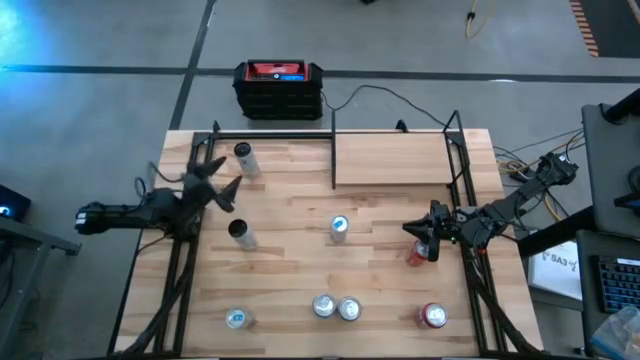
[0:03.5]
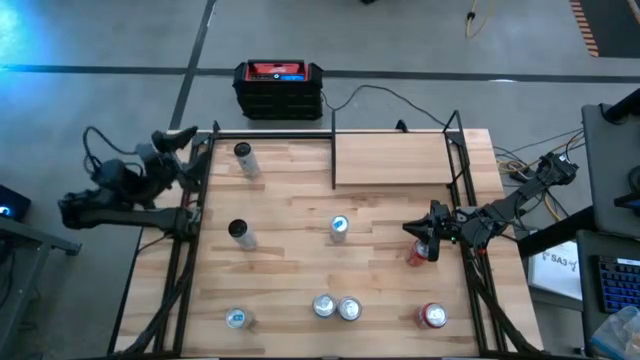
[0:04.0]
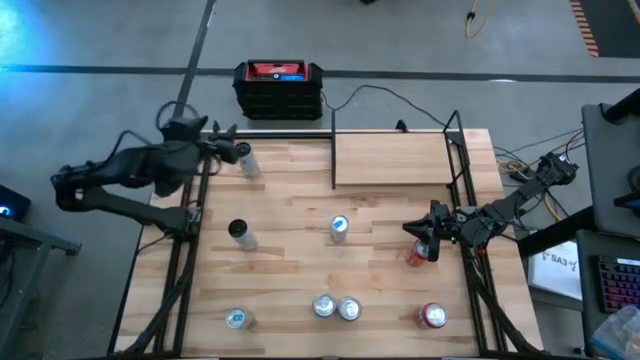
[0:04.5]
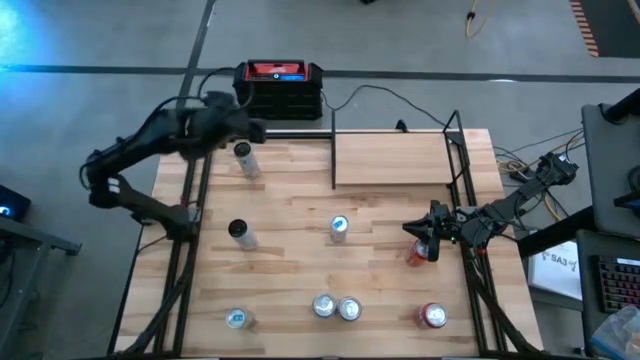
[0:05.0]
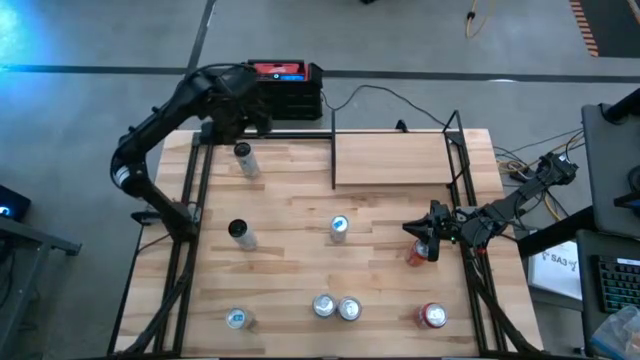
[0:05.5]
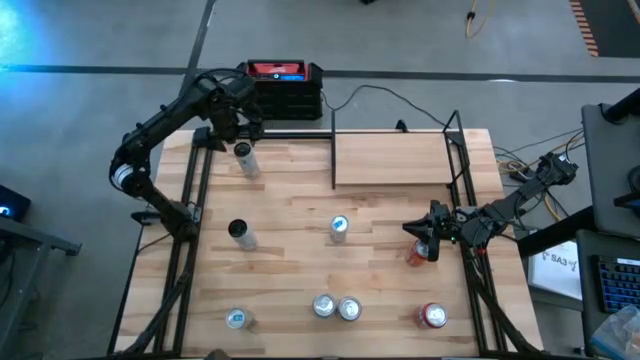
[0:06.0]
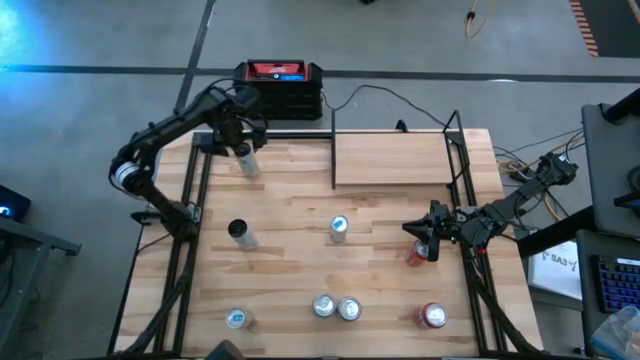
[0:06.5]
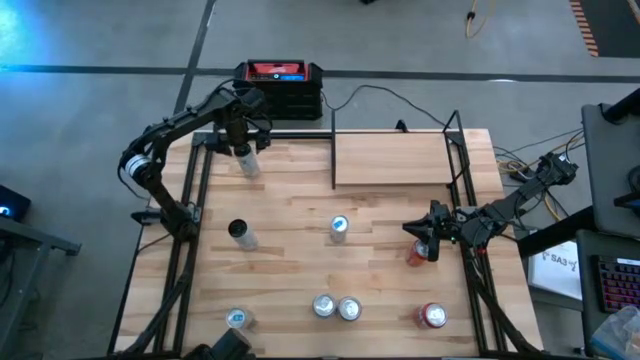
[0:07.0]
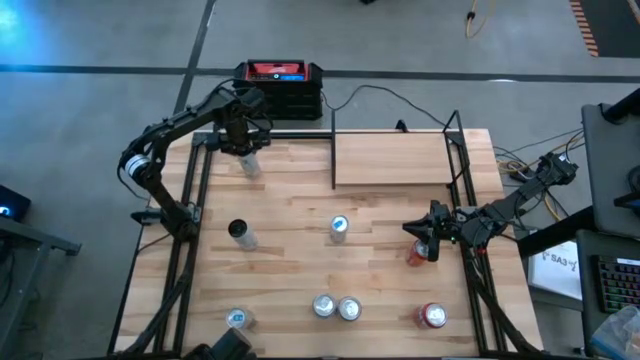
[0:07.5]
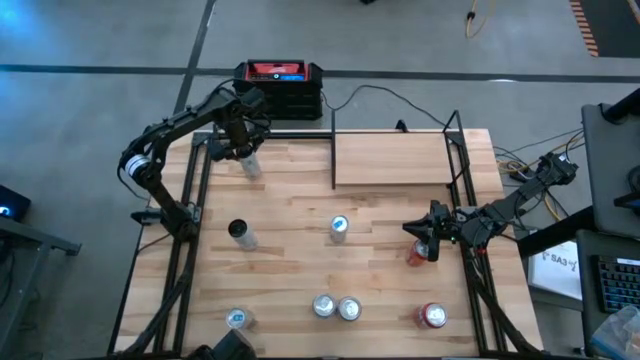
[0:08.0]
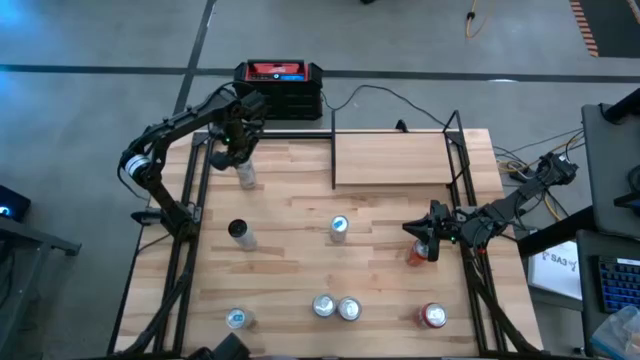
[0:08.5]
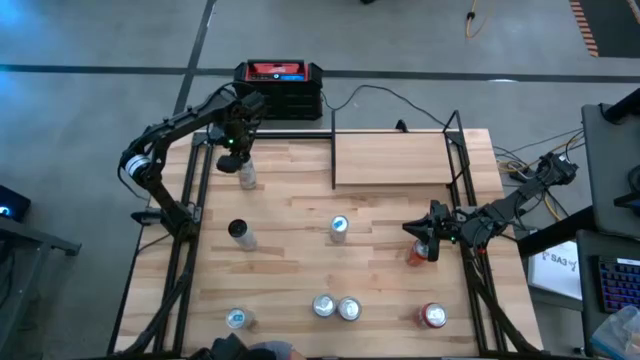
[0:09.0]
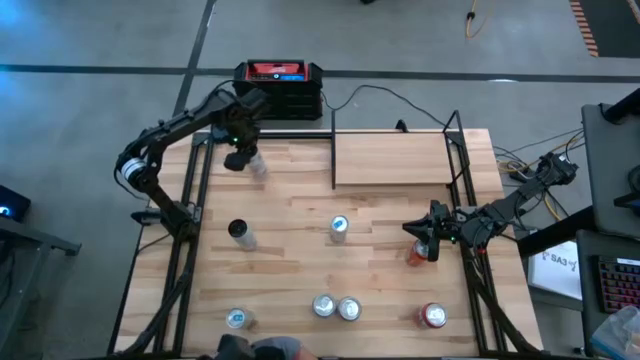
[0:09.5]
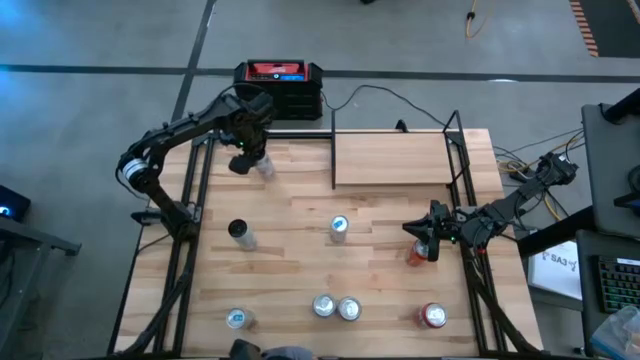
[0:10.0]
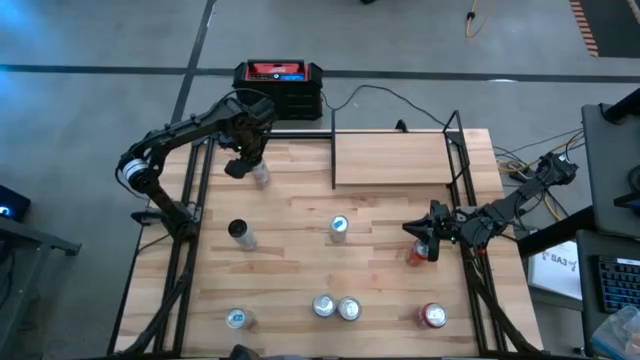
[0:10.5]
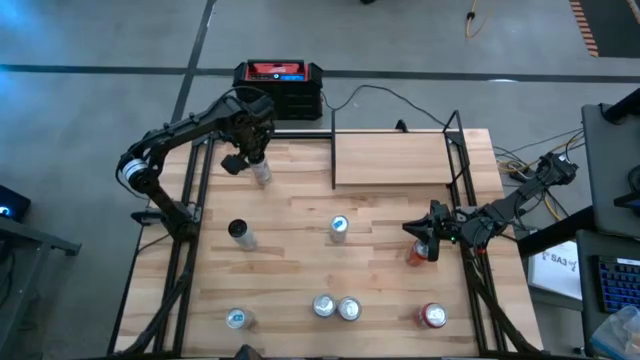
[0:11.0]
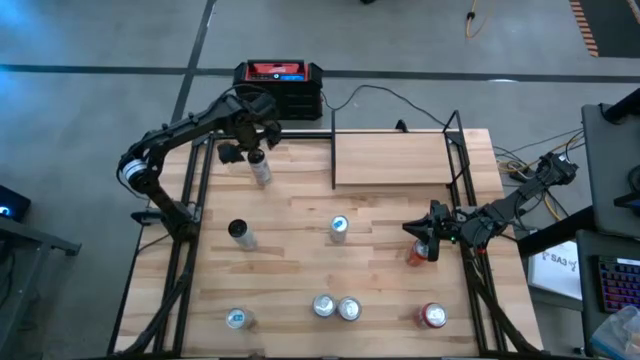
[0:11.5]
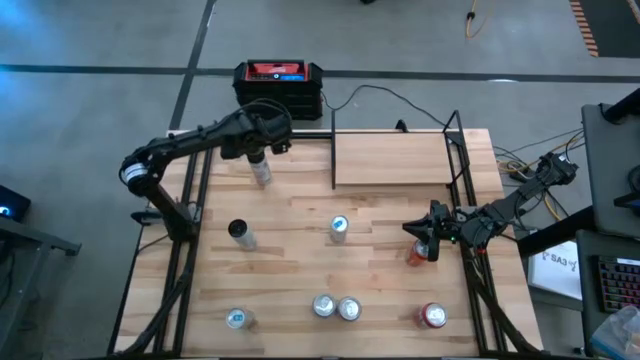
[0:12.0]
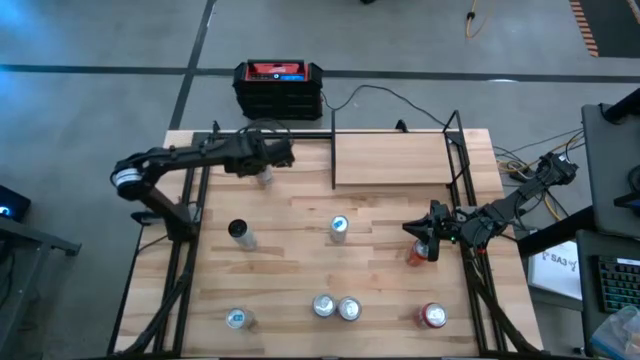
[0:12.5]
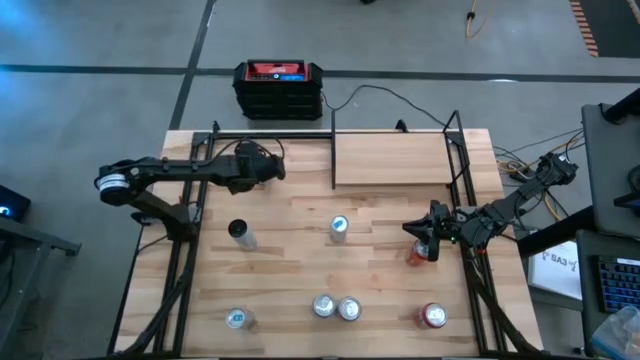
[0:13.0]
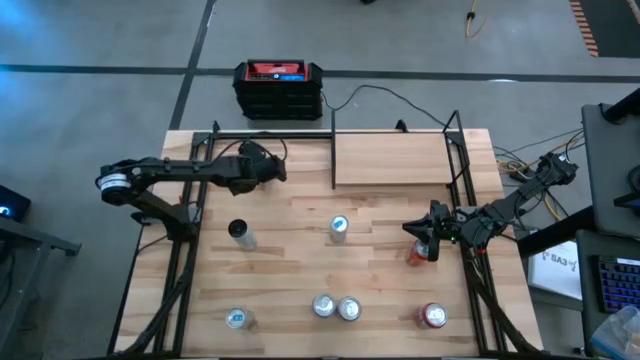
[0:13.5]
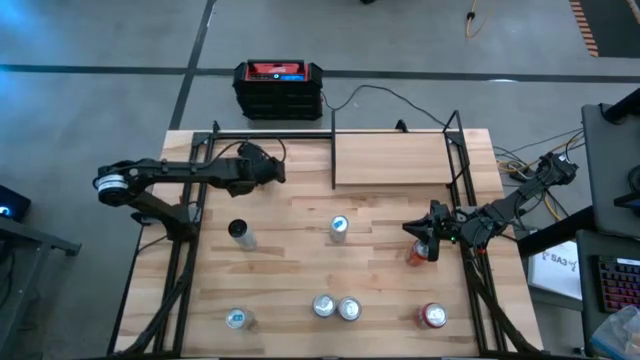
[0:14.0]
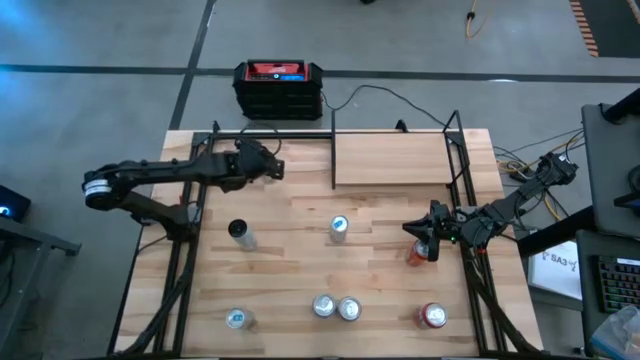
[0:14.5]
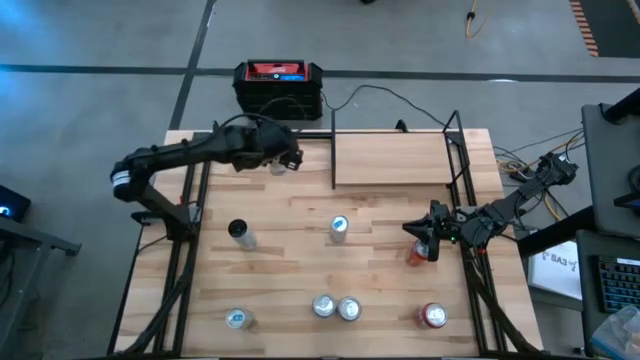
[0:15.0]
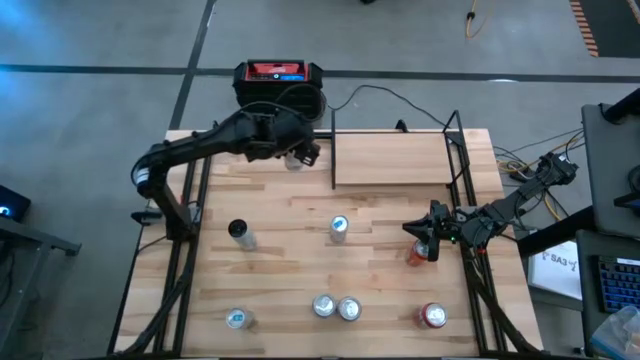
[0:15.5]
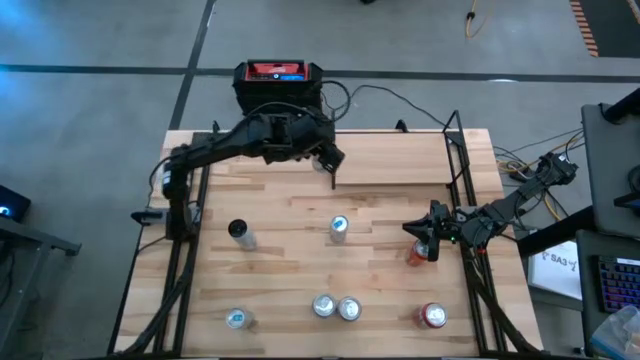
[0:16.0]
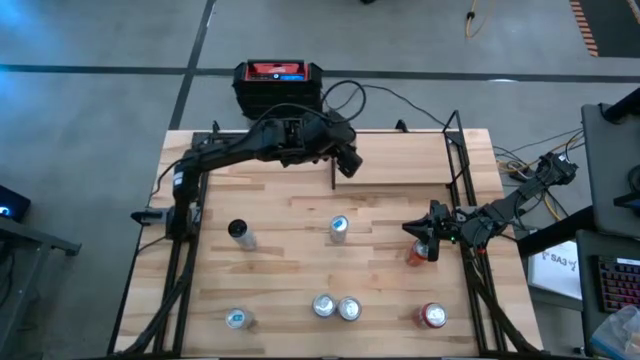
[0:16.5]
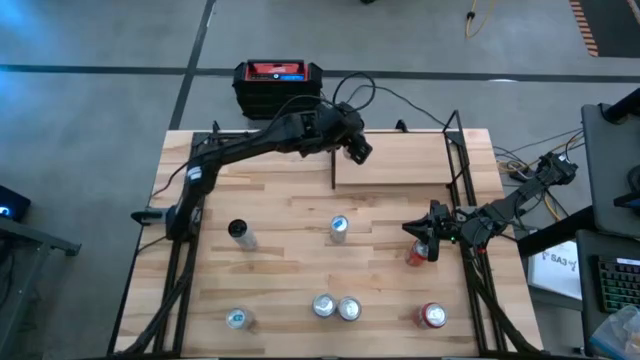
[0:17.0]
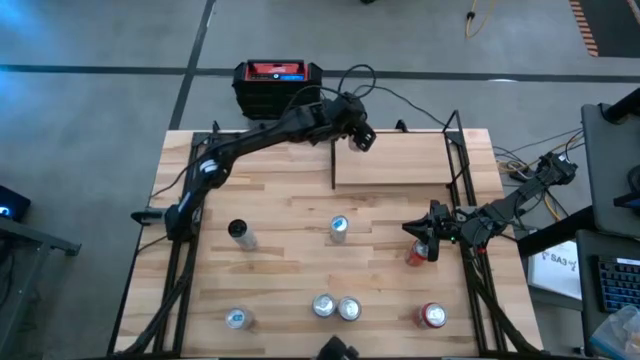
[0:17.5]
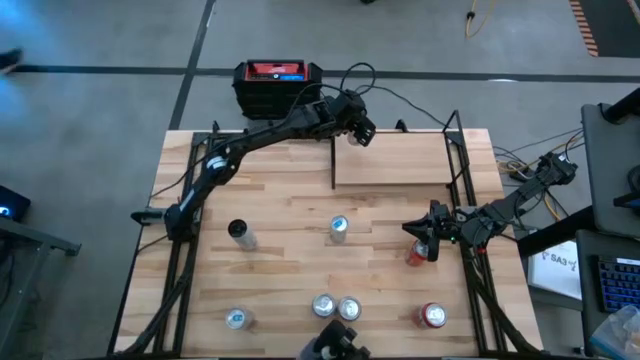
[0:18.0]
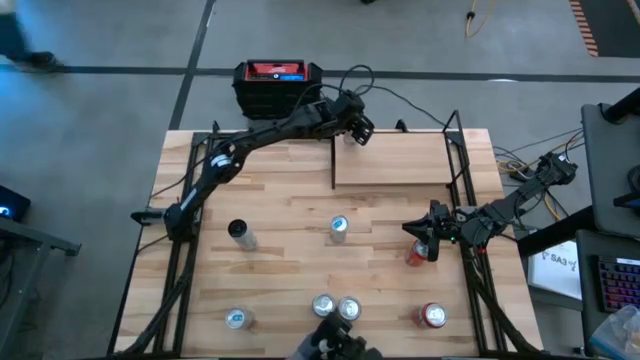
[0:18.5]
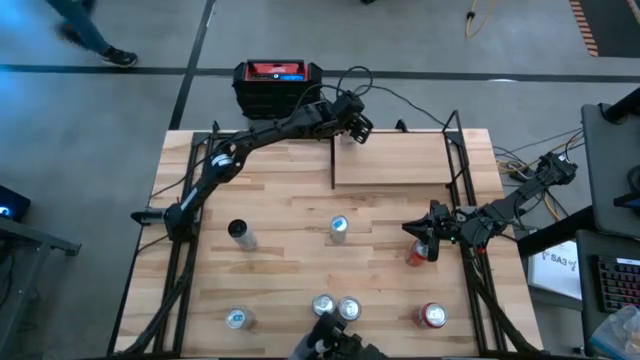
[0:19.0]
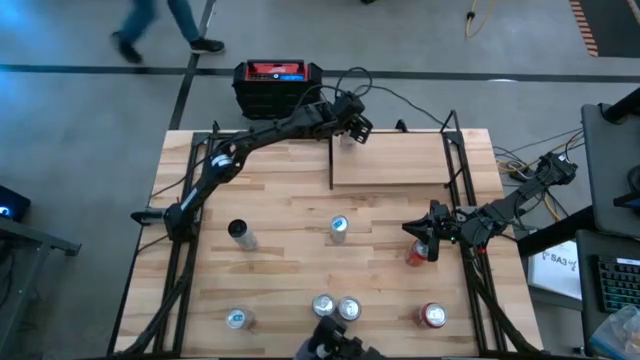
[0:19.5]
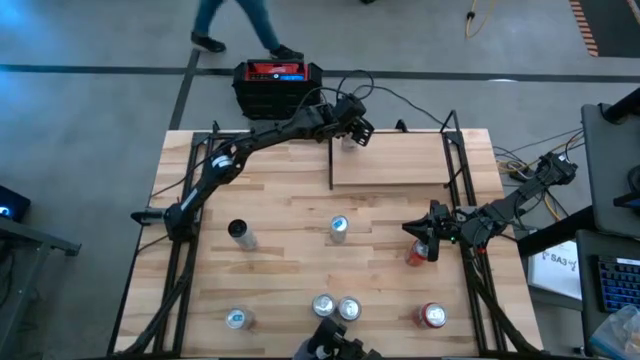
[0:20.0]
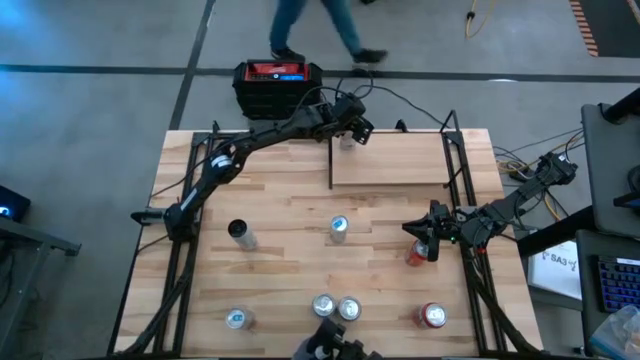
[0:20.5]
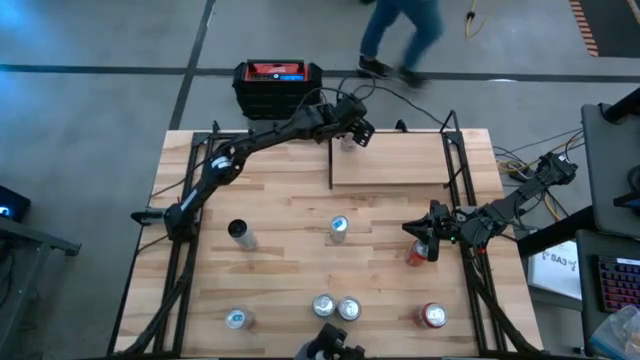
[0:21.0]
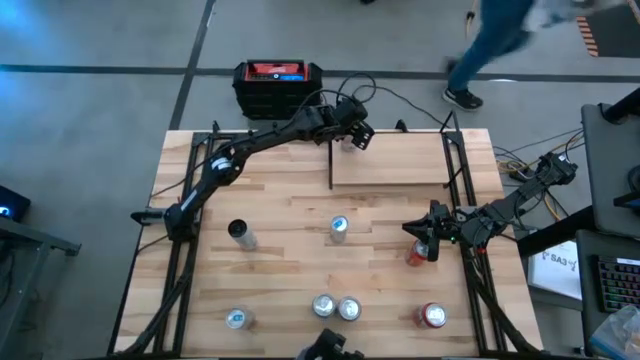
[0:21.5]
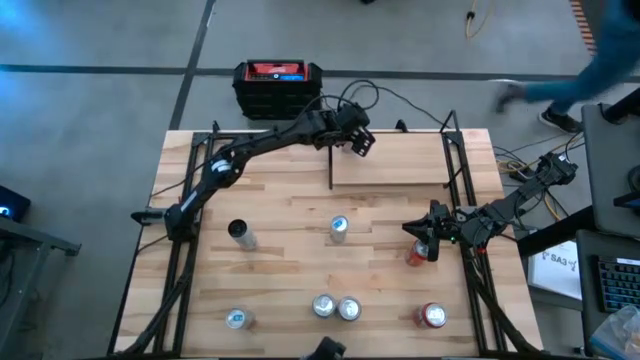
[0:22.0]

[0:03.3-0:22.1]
Task: Place canned beverage on shelf
Put the top white pink soda can on the shelf
